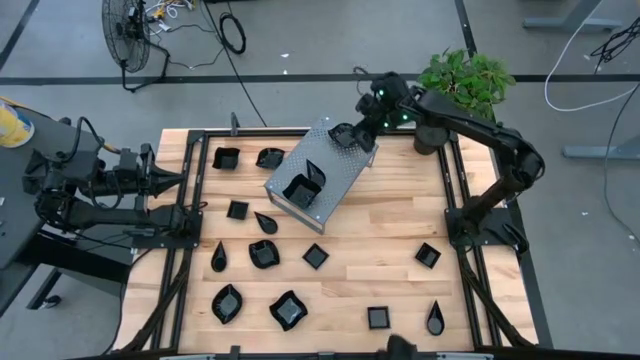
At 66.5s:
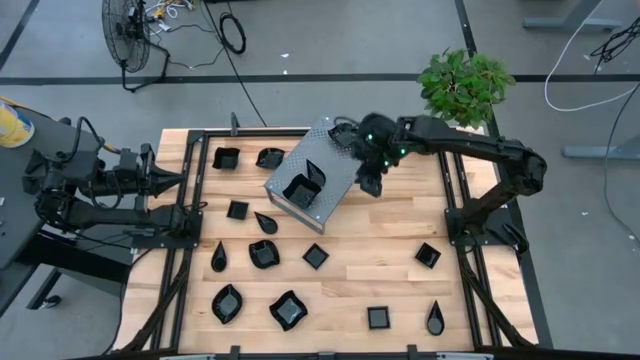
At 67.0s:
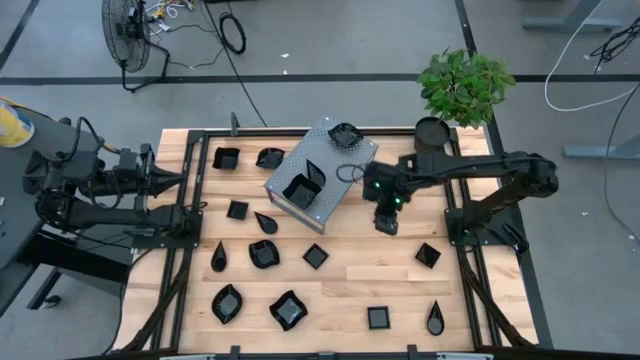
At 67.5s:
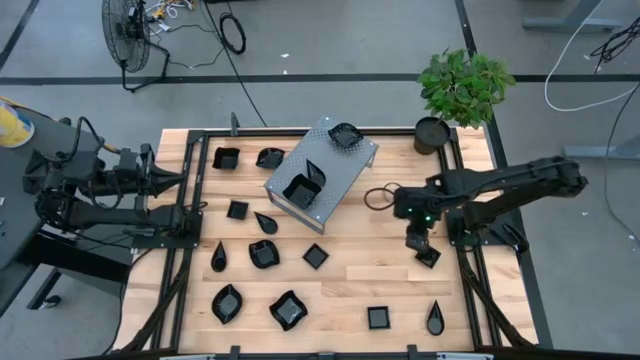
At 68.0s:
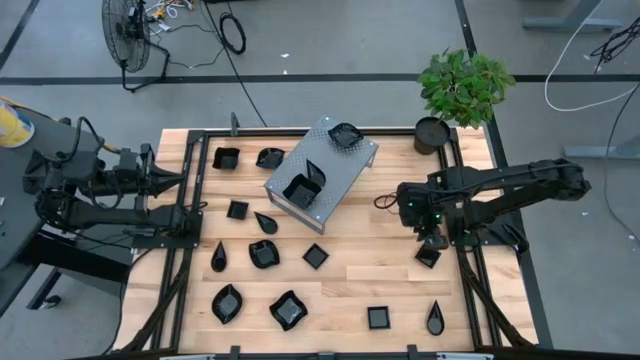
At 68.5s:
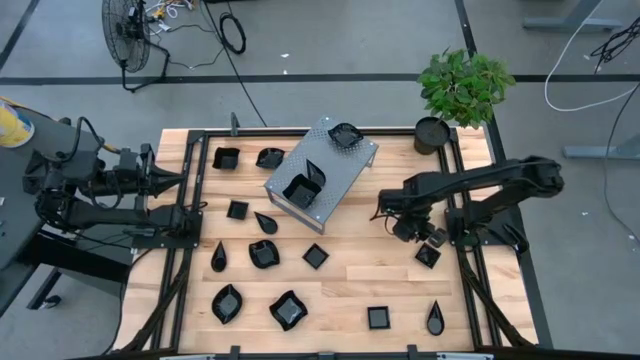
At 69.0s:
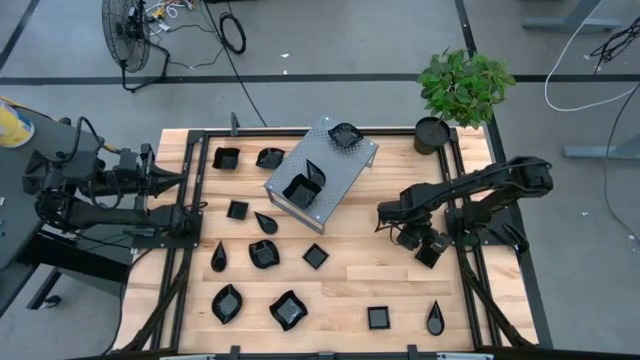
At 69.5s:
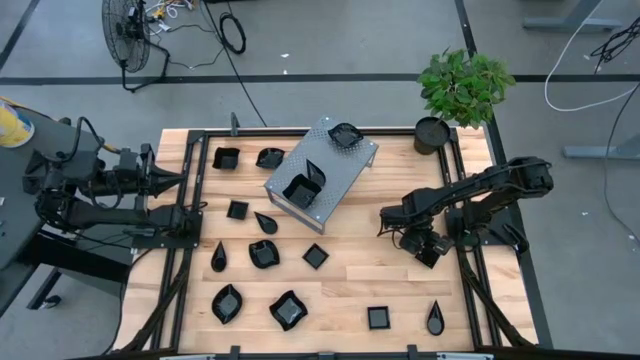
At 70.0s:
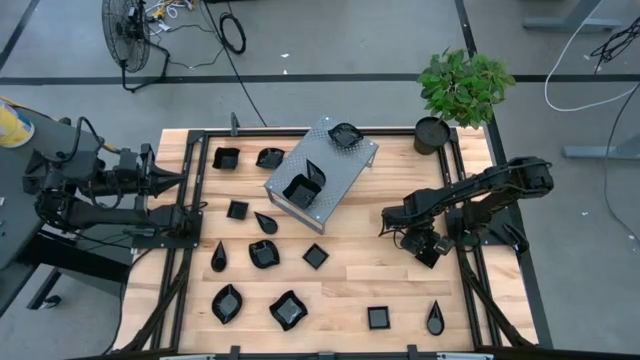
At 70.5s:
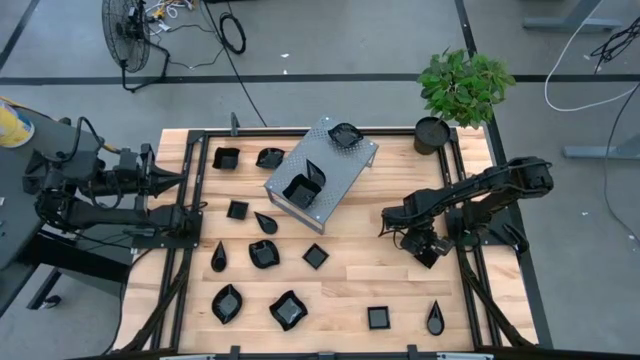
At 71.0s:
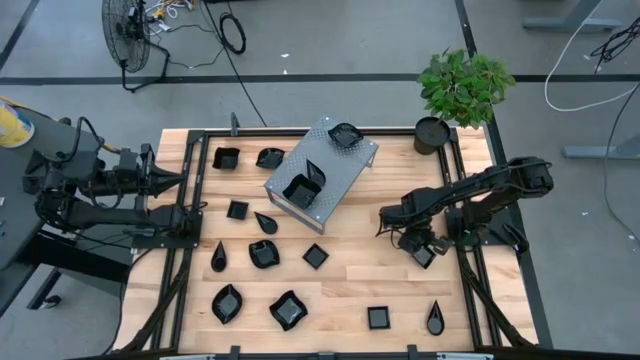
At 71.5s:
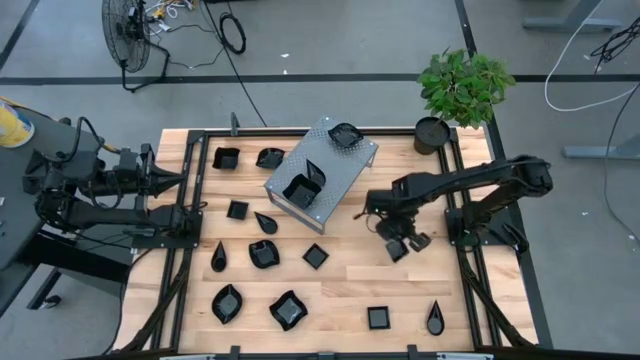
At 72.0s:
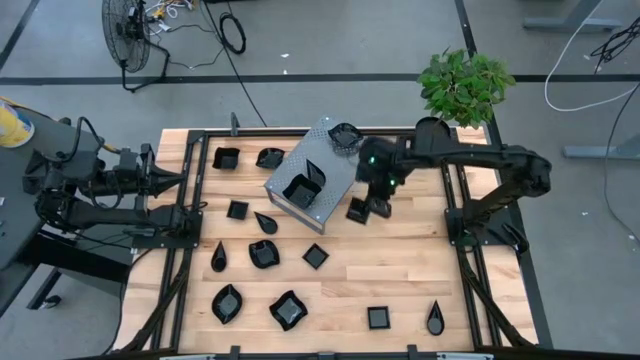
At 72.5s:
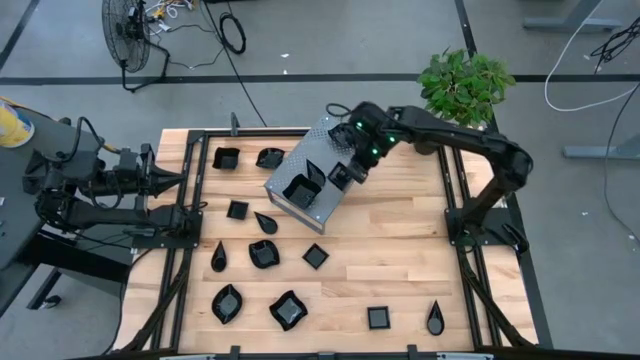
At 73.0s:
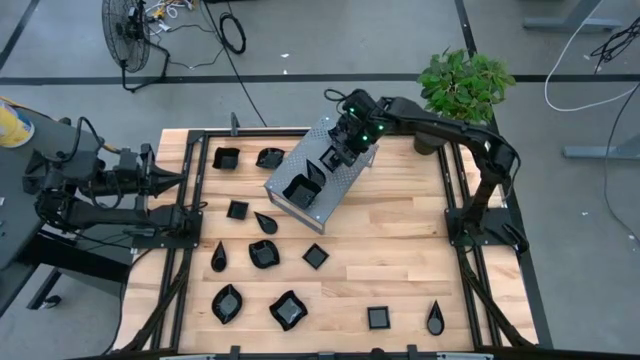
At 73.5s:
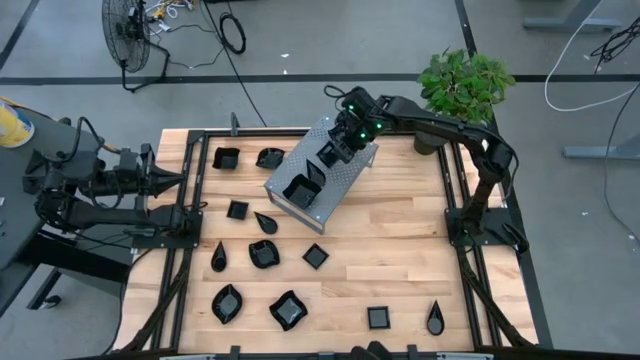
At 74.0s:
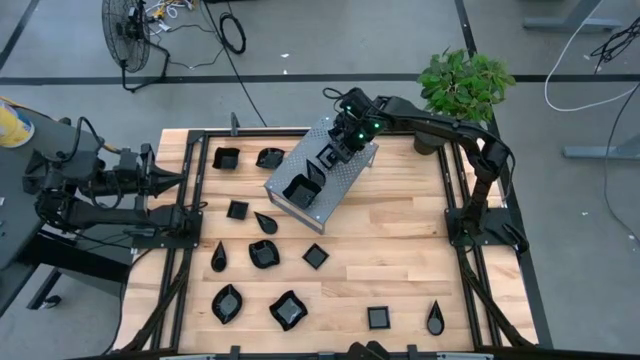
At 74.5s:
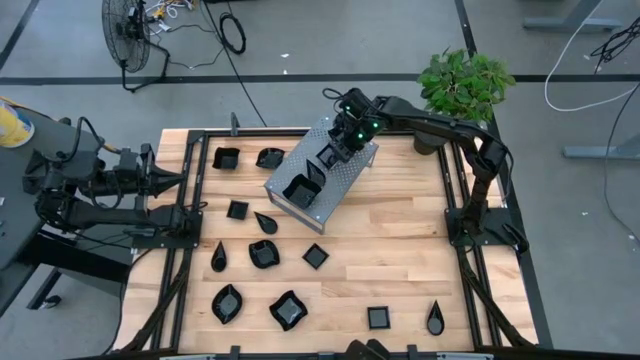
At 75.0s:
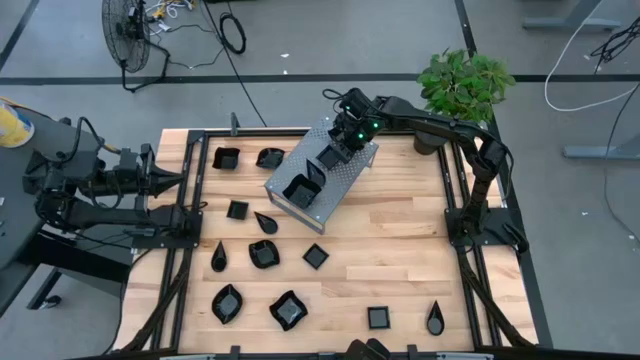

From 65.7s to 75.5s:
Task: Pick & Place Mini shaped plates
Put the black square shape plate on the shelf

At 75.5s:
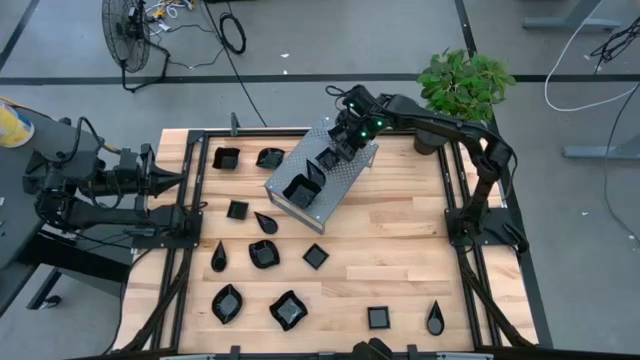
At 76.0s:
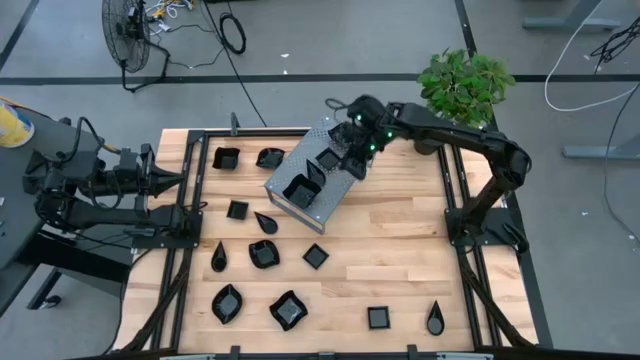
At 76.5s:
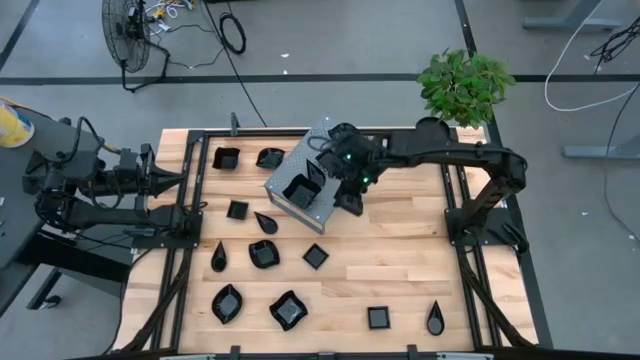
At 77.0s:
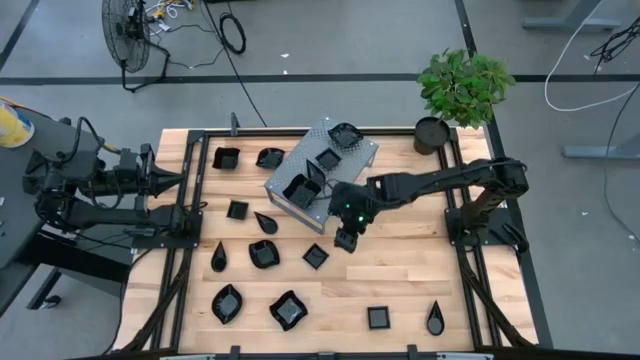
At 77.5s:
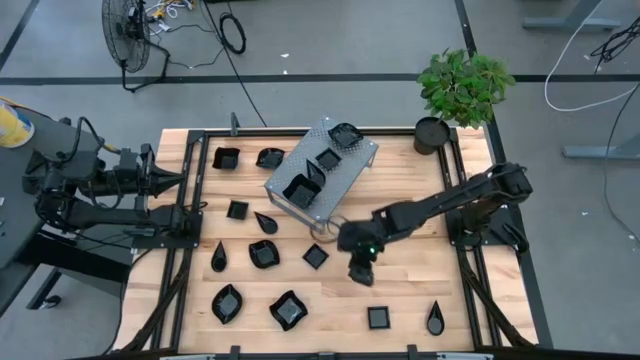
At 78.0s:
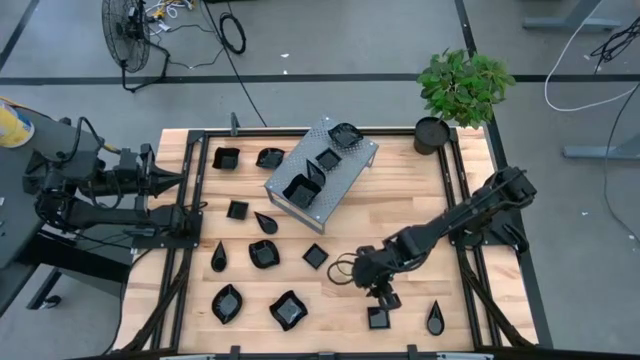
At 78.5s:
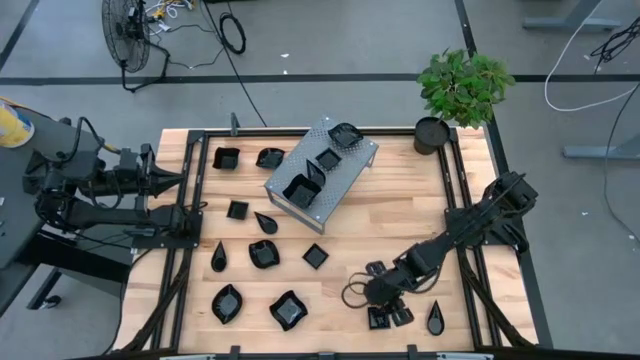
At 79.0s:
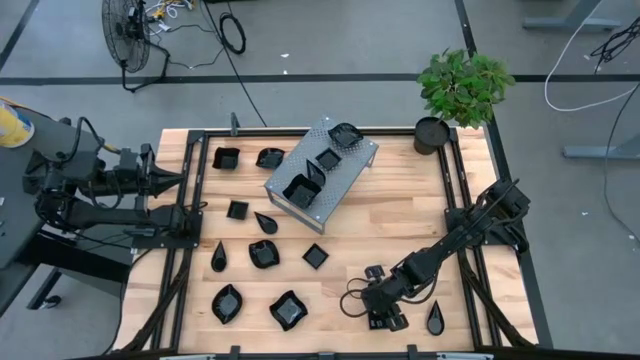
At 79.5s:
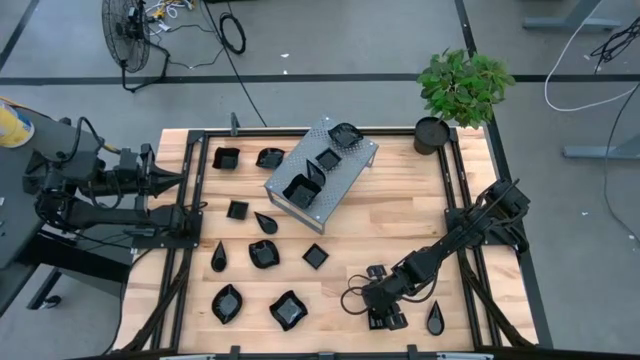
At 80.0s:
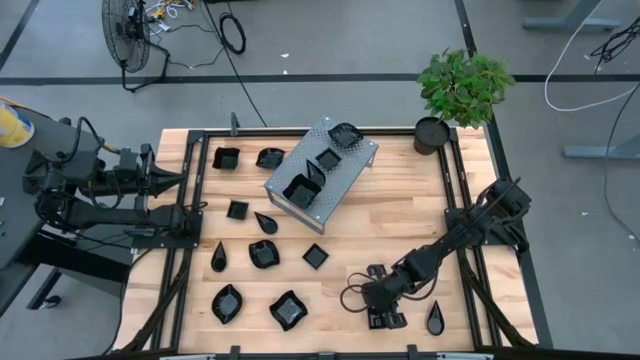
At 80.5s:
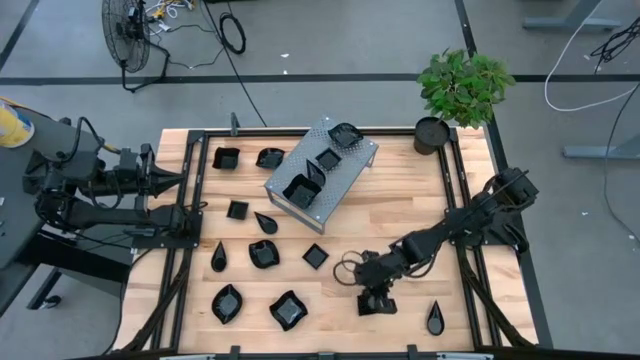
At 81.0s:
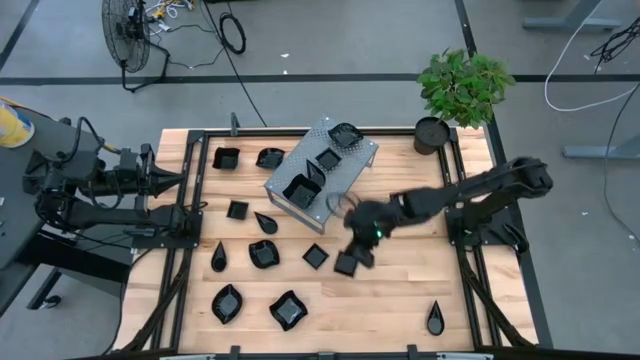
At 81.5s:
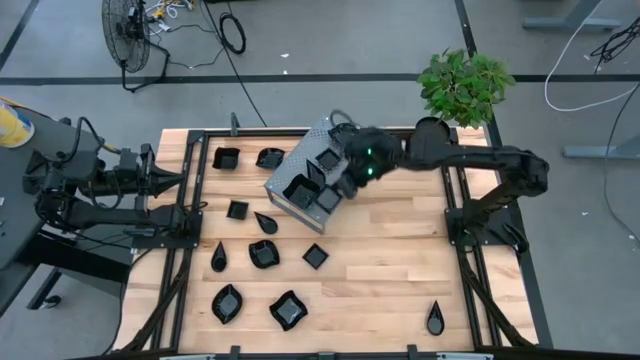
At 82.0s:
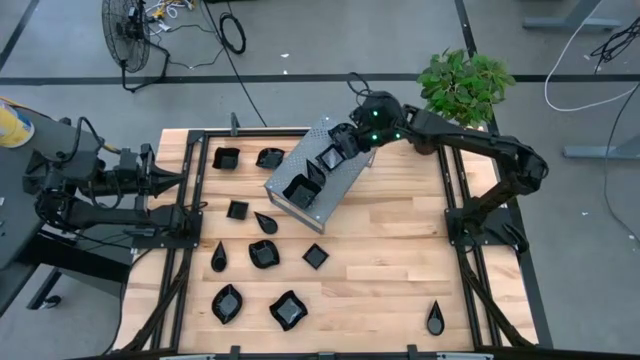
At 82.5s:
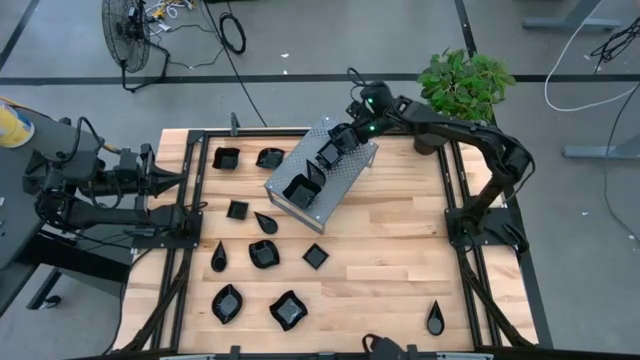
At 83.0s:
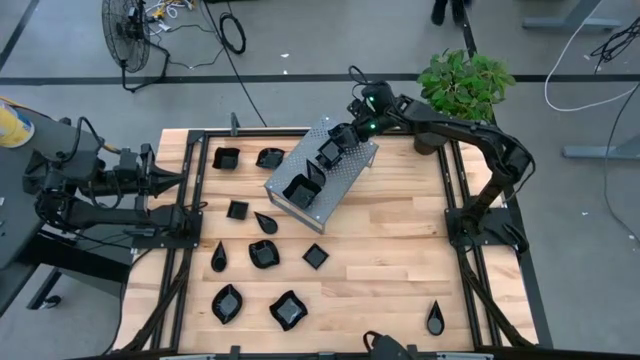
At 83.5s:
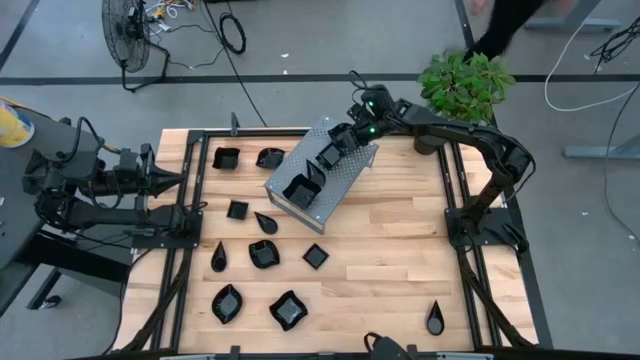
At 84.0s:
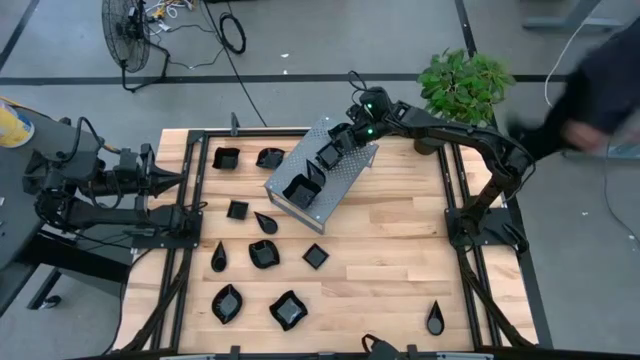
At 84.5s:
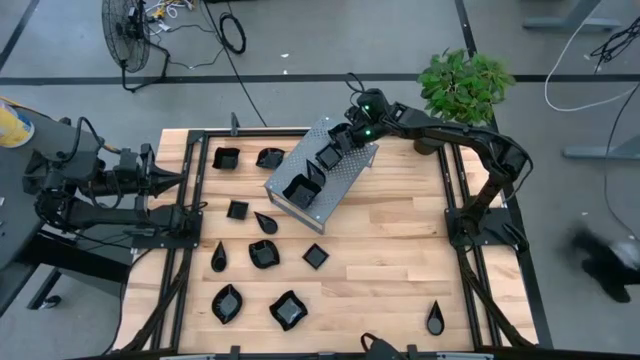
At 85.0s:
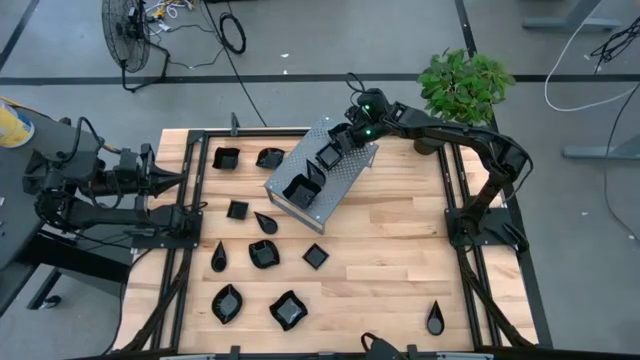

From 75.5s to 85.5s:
Stack the black square shape plate on top of the black square shape plate on the shelf

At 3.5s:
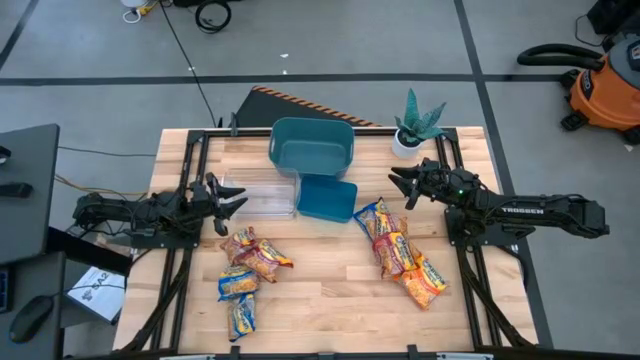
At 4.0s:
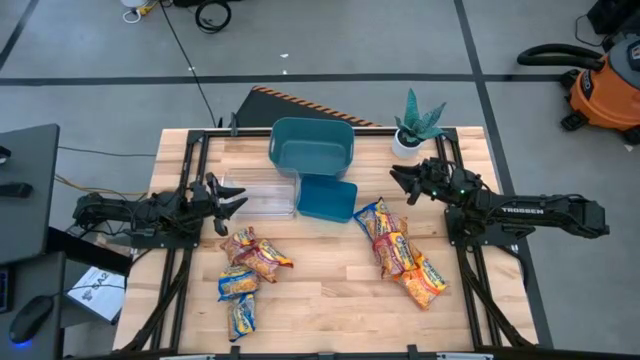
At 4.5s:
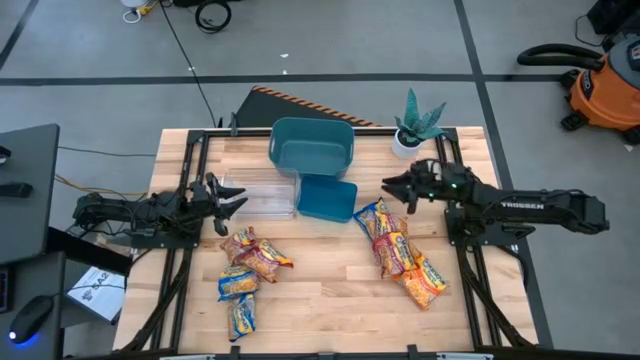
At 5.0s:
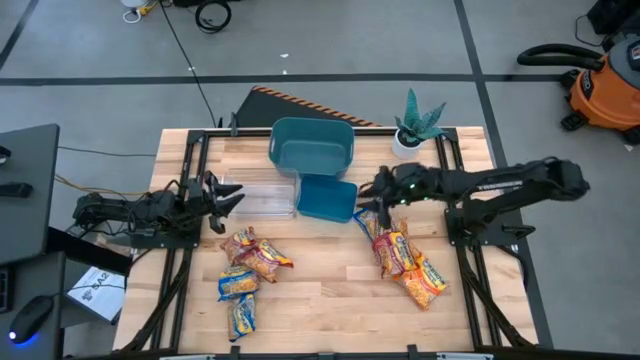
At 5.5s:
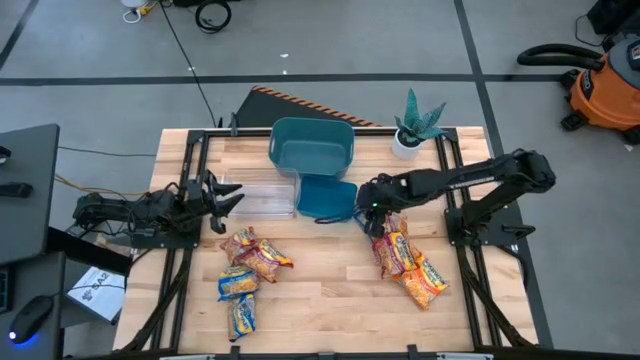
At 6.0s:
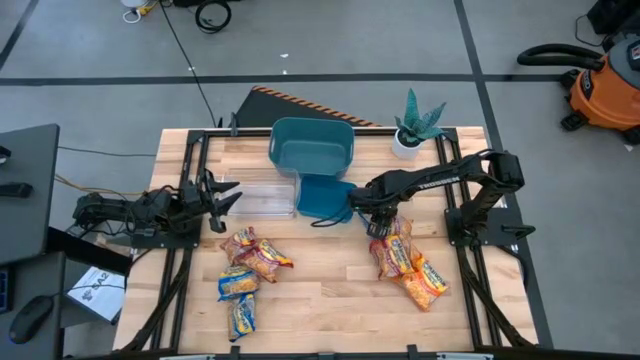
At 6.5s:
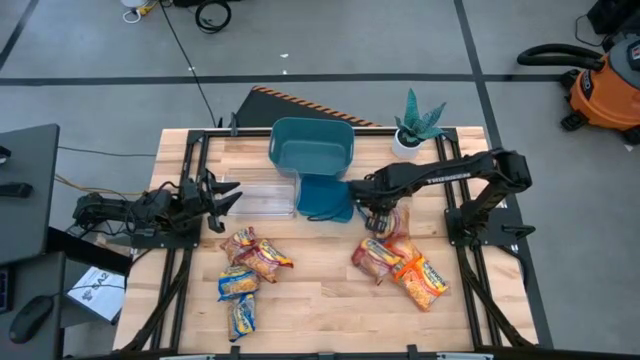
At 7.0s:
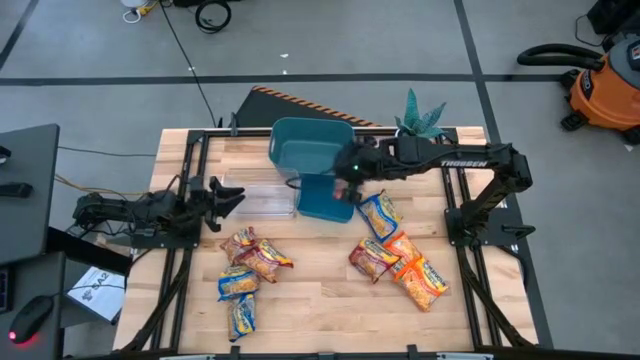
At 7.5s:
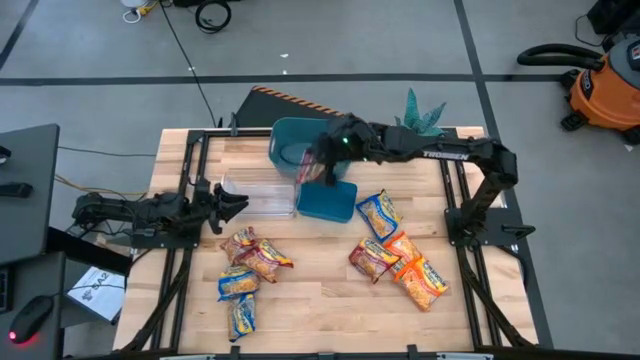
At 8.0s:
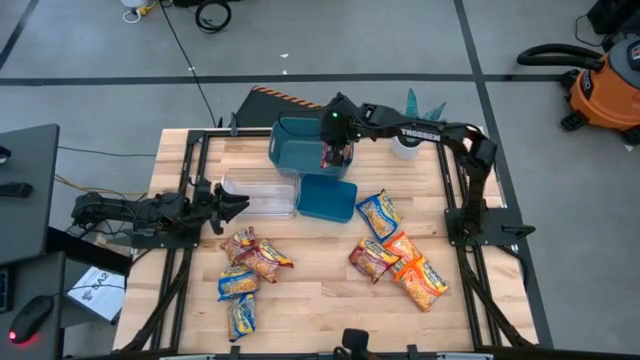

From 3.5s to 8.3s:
Task: Sort Maruchan noodles
Put the red noodle pack into the green bin
